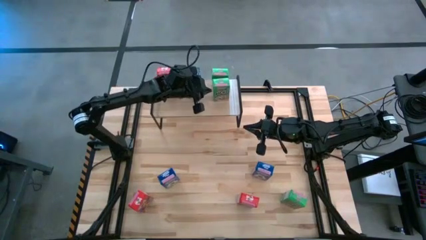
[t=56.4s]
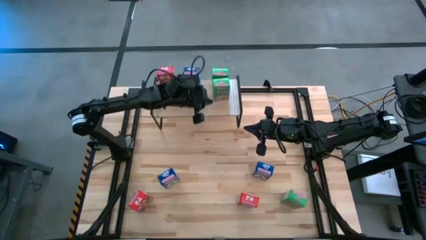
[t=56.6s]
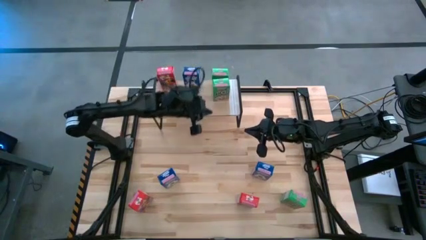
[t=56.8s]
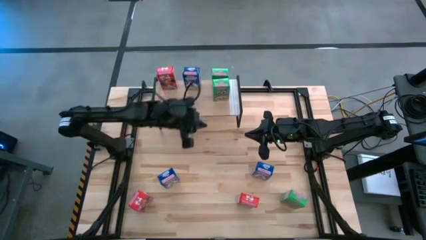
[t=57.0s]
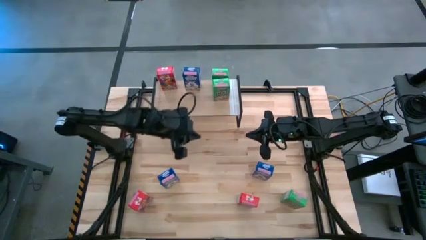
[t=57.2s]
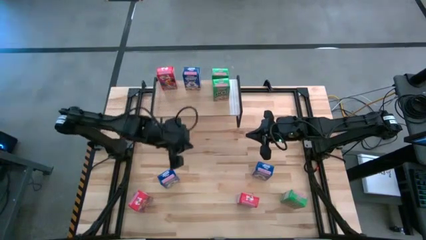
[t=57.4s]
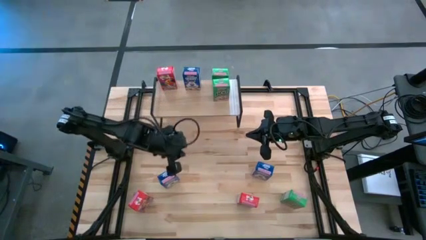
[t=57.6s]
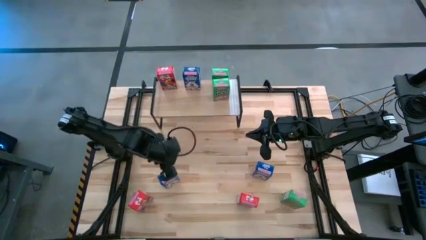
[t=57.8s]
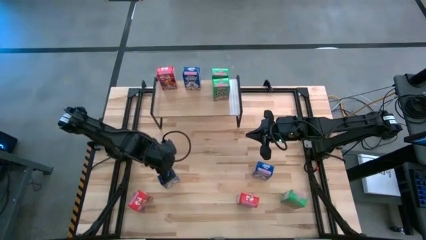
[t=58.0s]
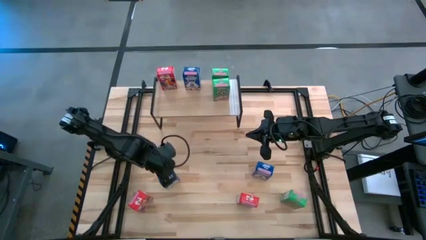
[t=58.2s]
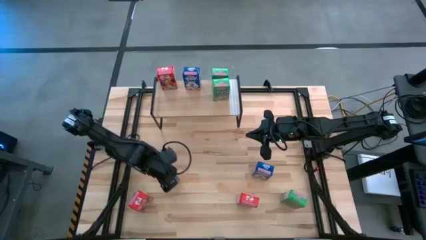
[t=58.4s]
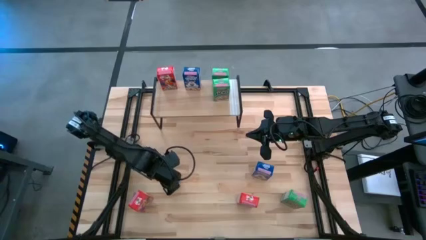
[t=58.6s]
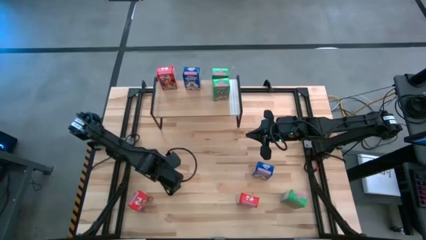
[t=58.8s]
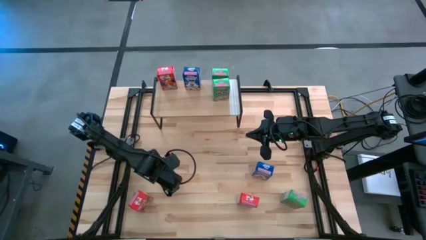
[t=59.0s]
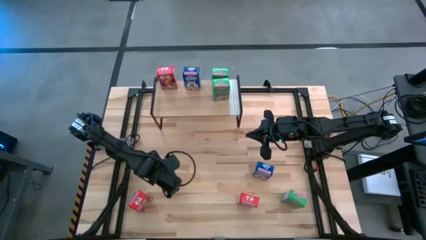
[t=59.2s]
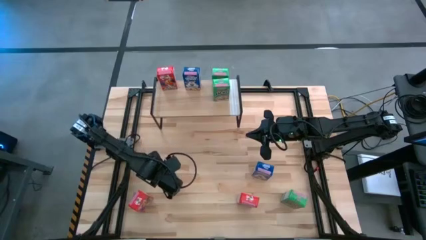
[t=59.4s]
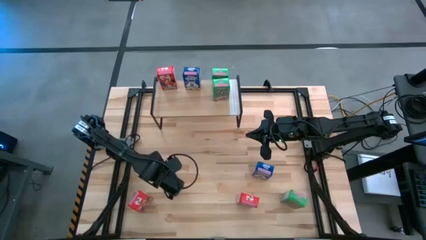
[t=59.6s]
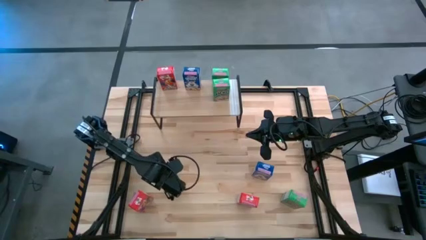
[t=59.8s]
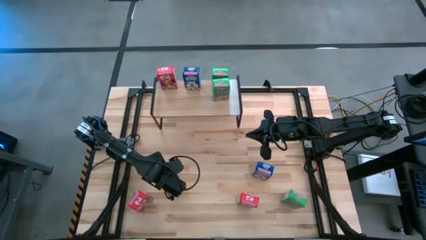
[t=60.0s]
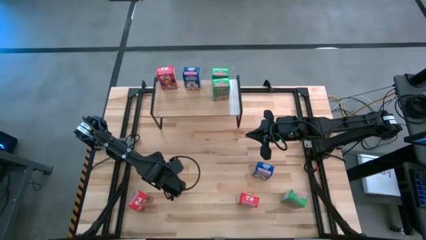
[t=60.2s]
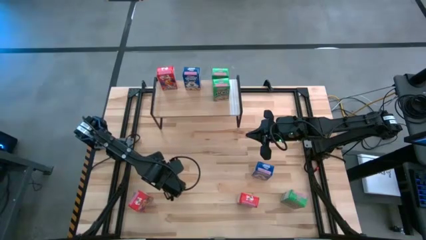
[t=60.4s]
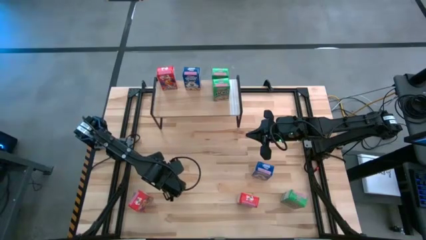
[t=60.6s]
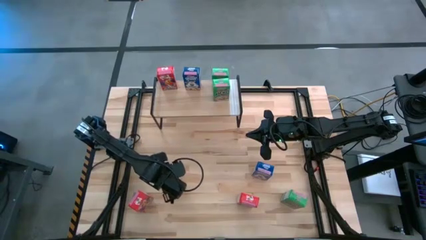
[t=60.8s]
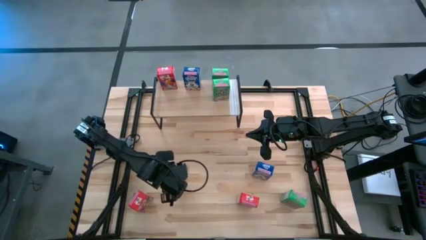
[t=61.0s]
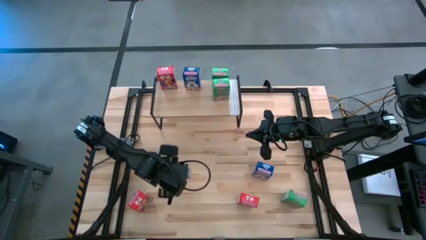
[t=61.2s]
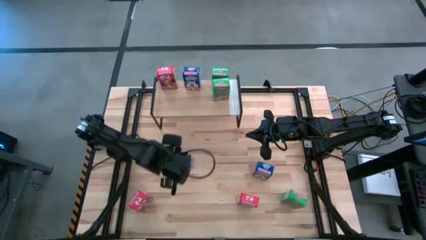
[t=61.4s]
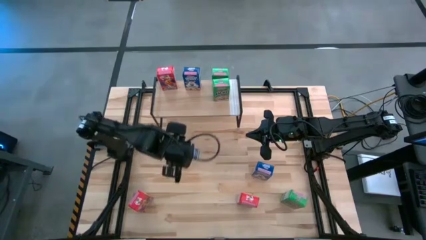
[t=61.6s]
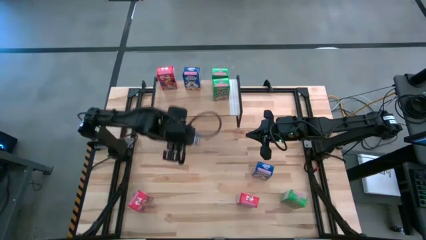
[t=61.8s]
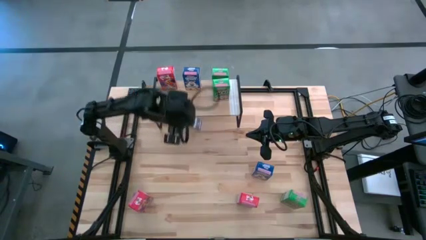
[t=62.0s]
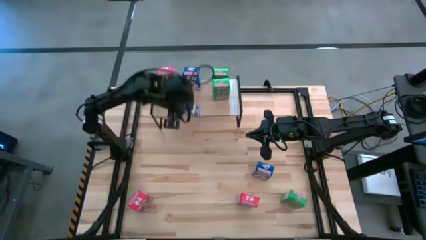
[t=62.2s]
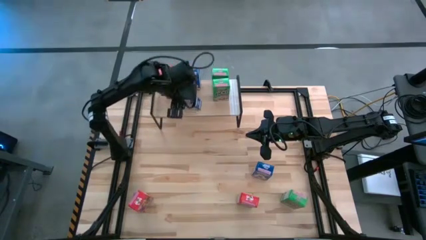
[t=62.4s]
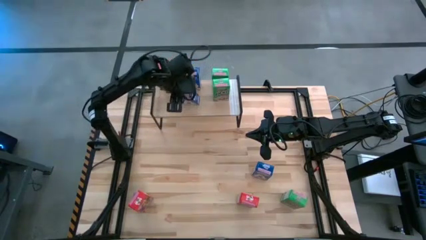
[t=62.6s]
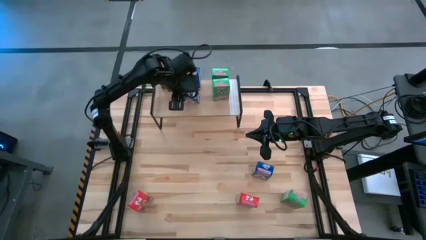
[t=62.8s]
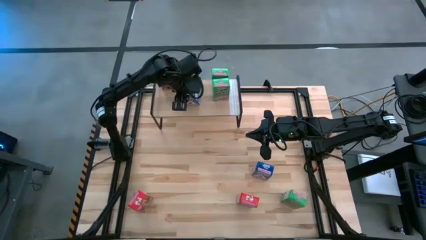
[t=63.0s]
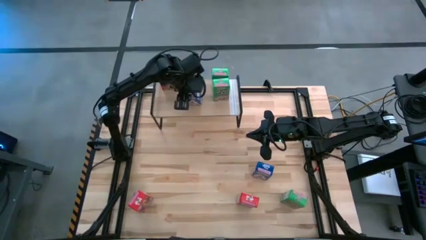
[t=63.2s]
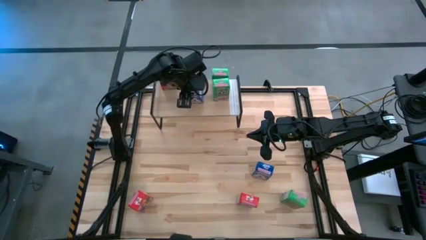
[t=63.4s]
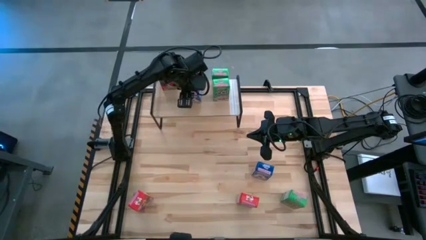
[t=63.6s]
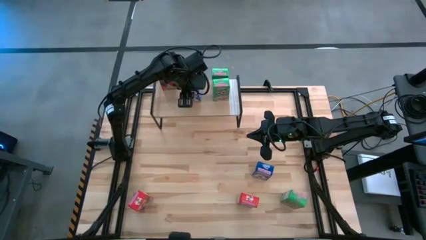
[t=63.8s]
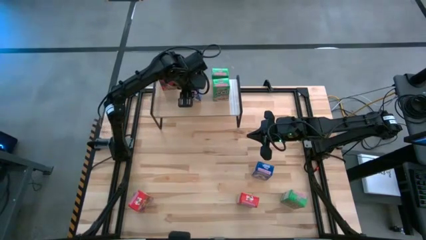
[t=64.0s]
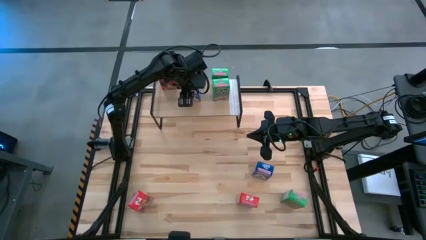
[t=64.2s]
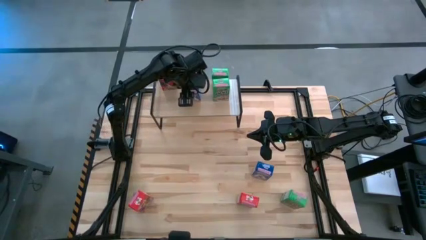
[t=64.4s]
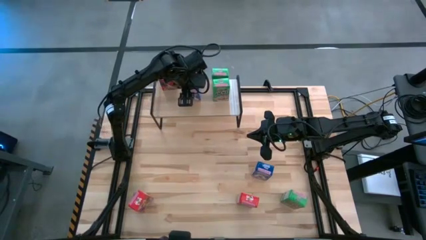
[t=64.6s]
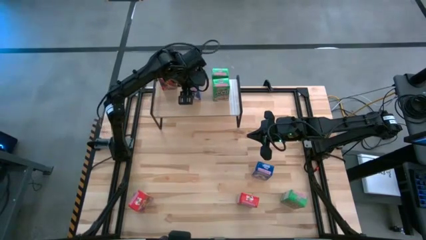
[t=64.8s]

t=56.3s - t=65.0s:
Task: Stack cereal on shelf
Put the left blue cereal box on the shelf aligned with the blue cereal box

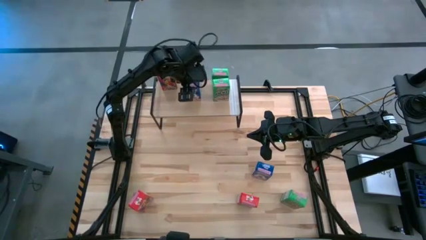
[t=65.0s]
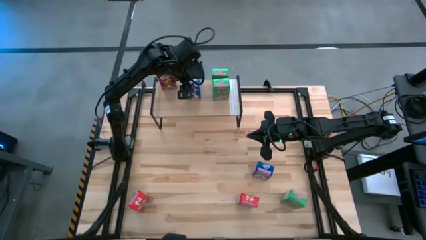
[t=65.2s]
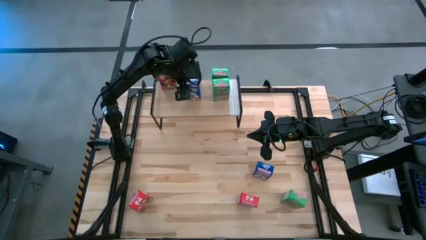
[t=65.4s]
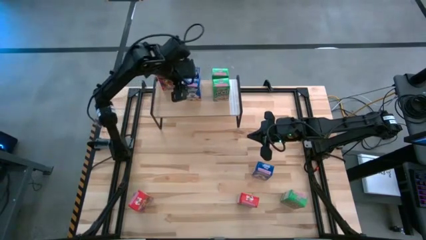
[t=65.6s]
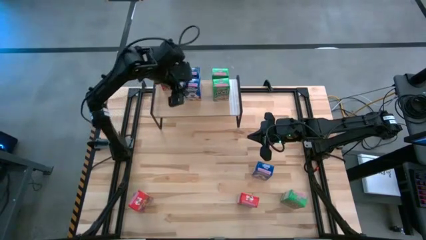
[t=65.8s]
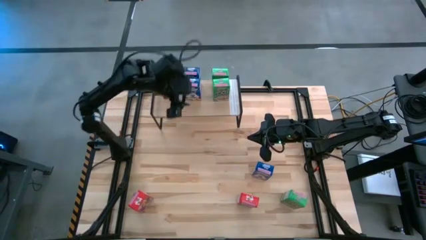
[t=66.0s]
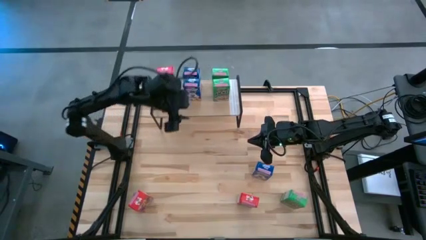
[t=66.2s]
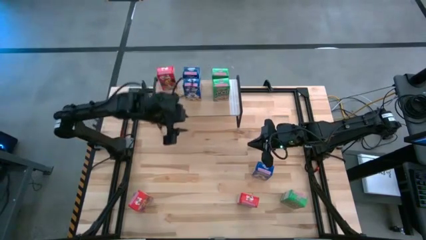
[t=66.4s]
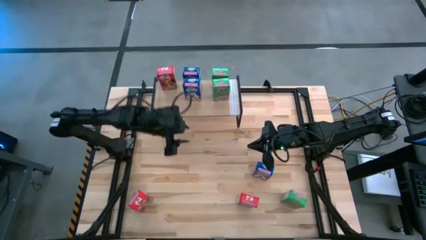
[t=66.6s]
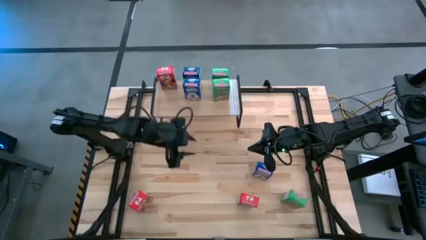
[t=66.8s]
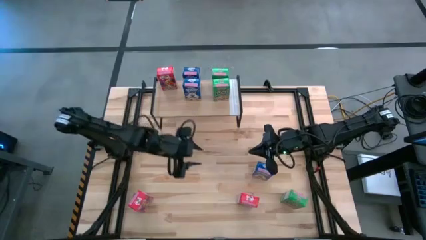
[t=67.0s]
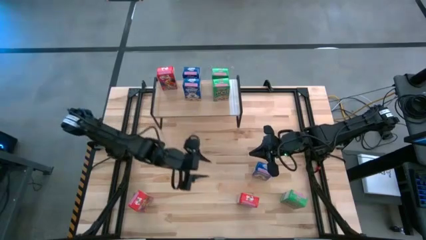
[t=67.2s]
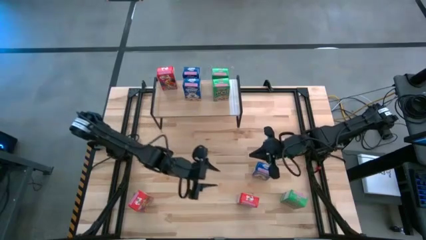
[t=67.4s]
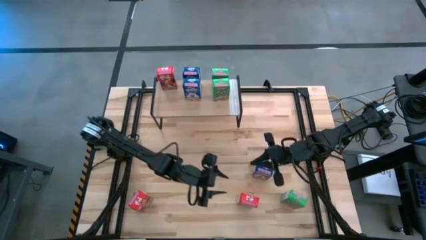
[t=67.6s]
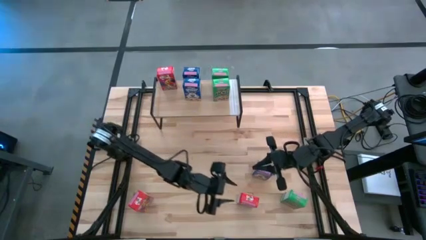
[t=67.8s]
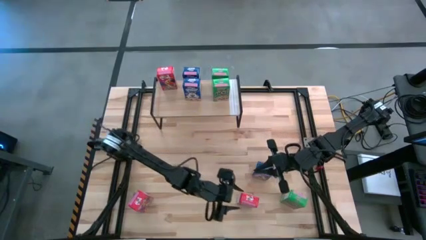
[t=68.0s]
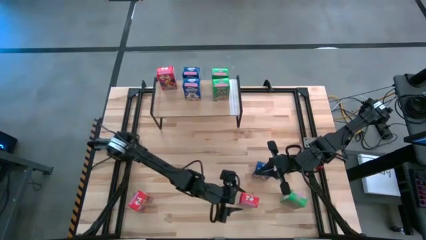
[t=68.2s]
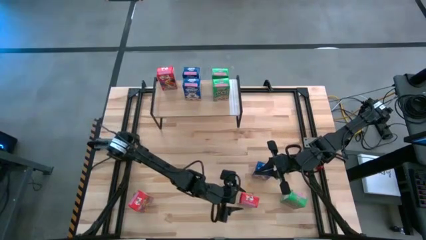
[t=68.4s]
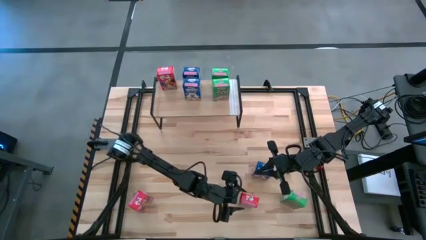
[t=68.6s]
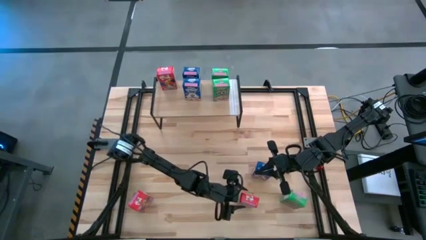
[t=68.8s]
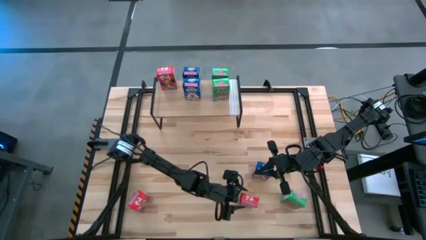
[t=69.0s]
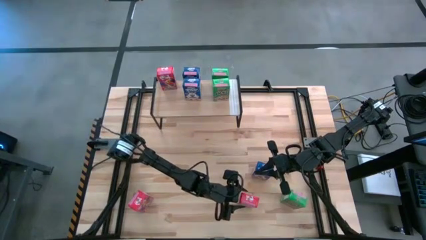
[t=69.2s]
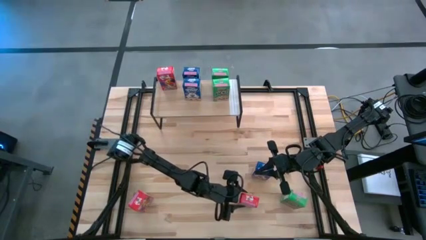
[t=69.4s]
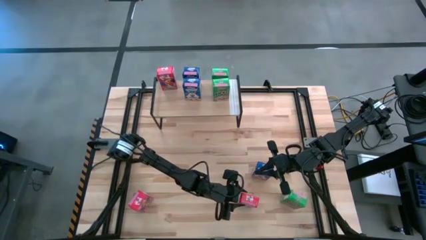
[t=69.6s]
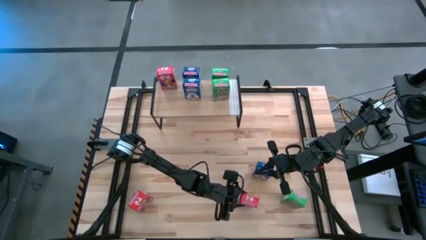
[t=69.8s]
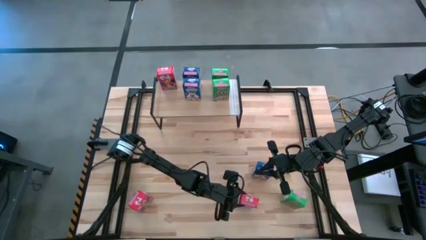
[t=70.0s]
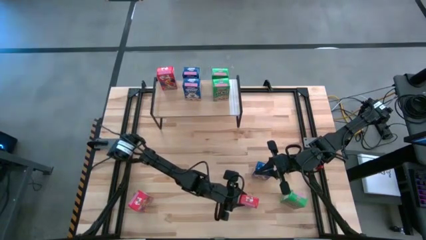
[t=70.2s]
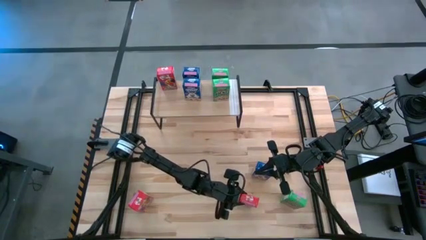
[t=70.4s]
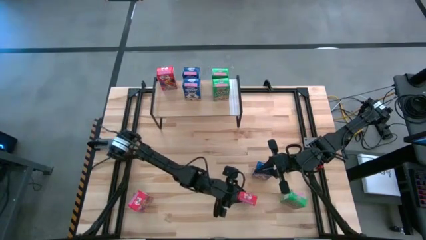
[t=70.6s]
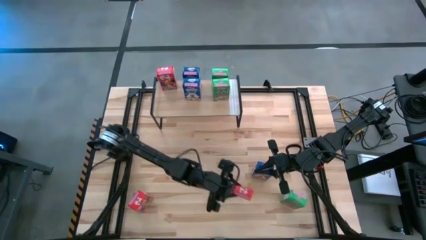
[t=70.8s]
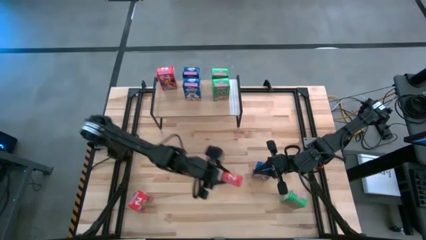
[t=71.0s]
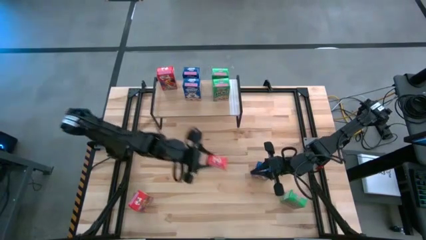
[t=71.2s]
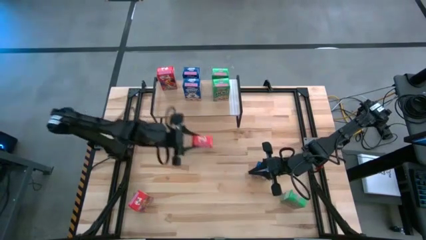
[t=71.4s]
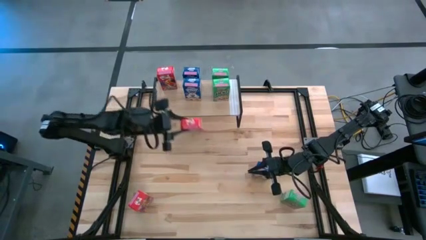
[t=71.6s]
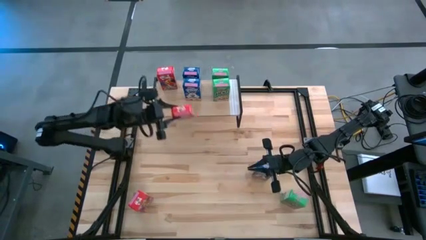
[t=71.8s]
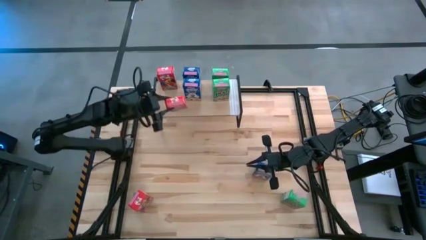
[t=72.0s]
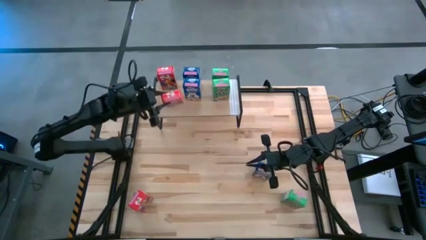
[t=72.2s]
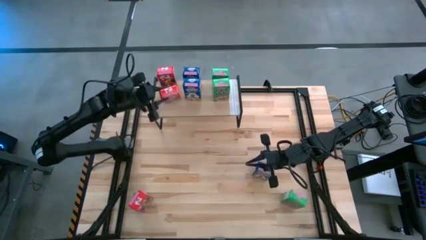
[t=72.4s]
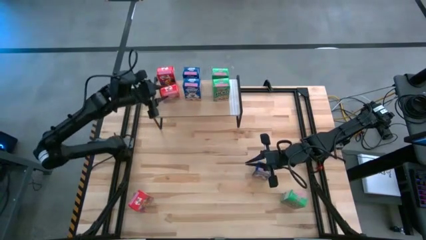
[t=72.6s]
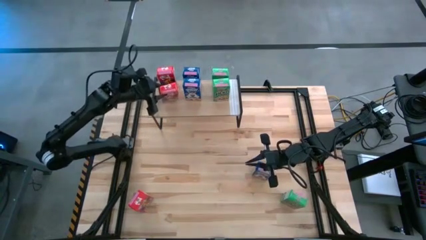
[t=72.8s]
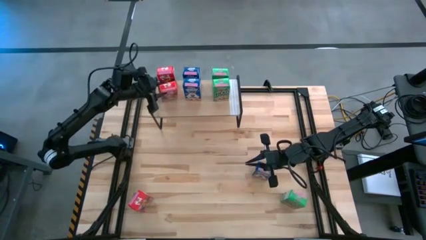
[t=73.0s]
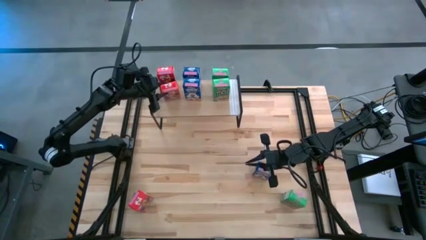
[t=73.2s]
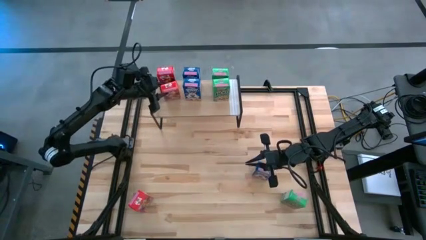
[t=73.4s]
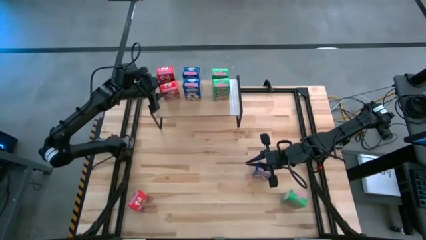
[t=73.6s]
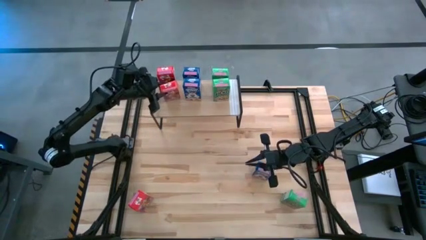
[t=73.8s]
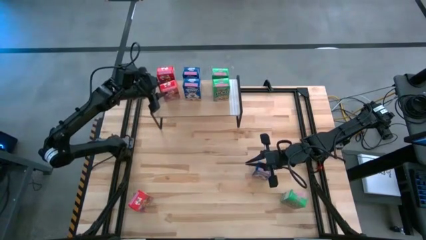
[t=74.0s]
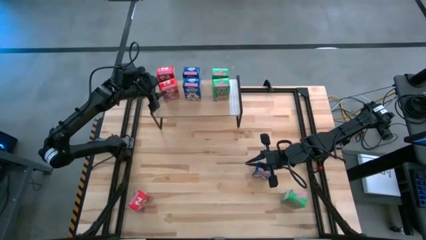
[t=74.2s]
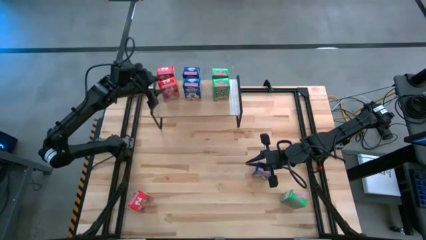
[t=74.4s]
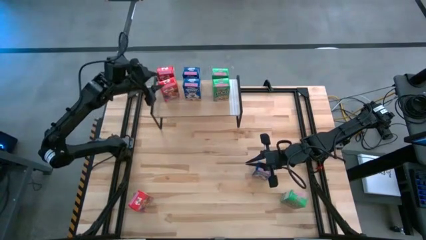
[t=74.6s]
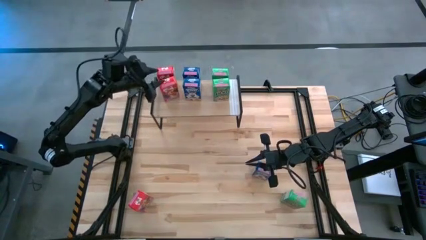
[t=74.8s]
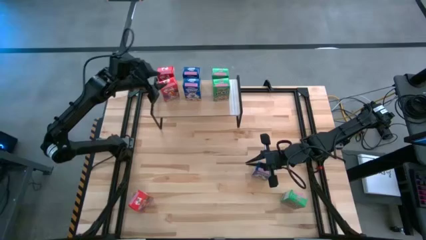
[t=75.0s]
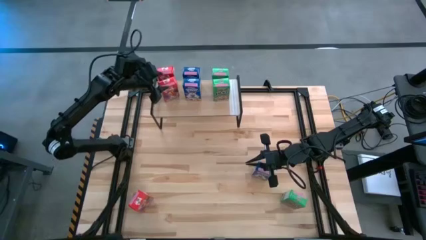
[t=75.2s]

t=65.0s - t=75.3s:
Put the right red cereal box on the shelf aligned with the red cereal box
